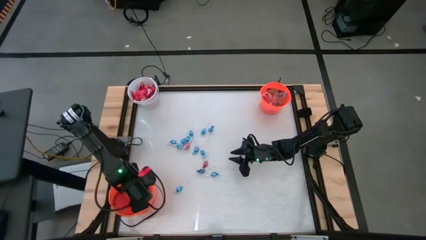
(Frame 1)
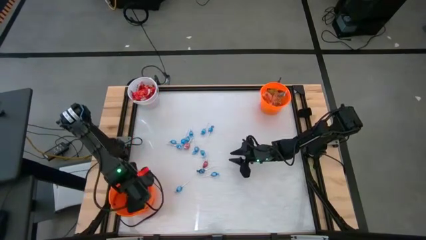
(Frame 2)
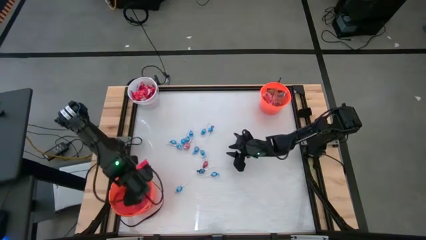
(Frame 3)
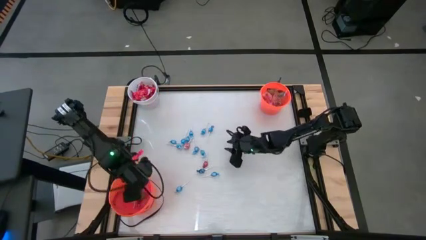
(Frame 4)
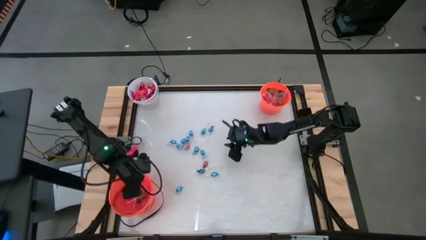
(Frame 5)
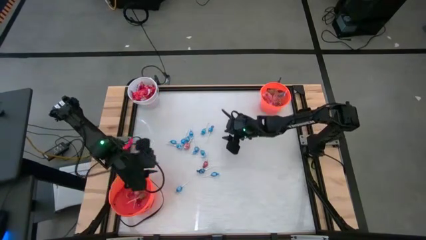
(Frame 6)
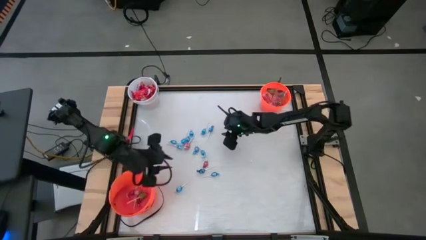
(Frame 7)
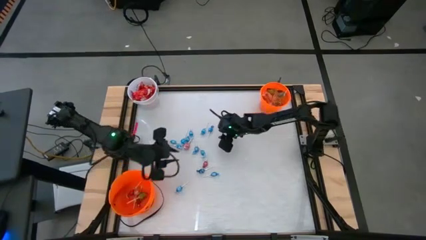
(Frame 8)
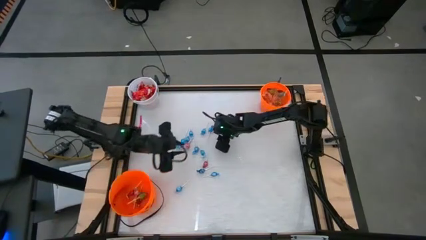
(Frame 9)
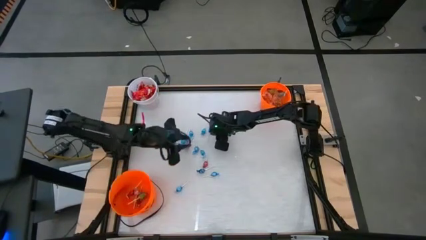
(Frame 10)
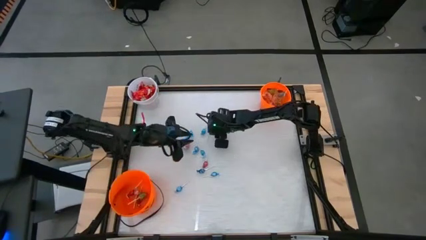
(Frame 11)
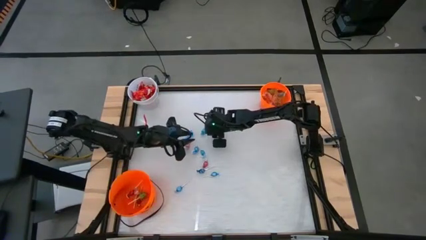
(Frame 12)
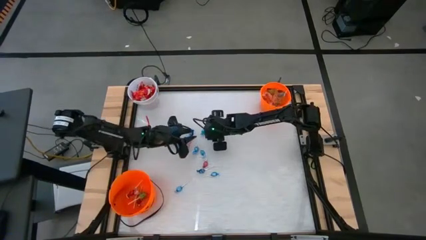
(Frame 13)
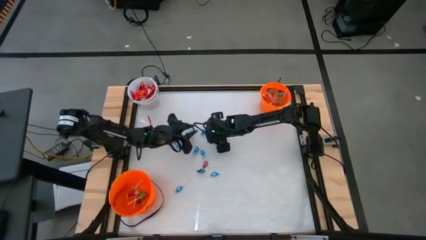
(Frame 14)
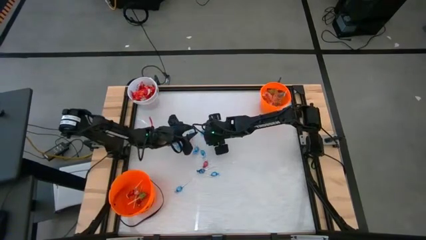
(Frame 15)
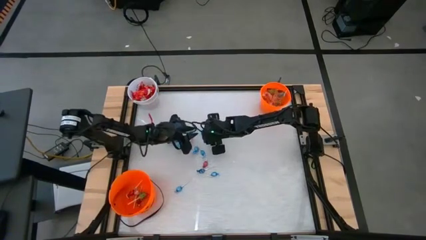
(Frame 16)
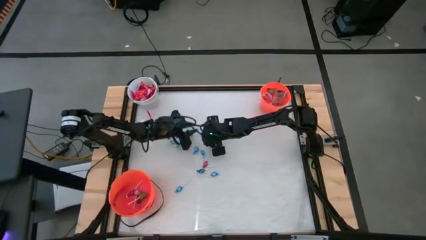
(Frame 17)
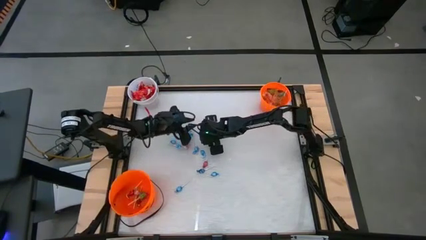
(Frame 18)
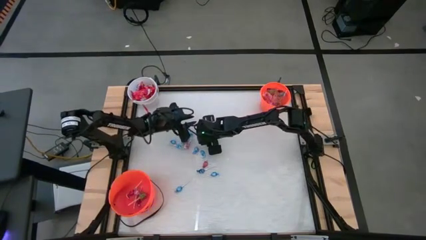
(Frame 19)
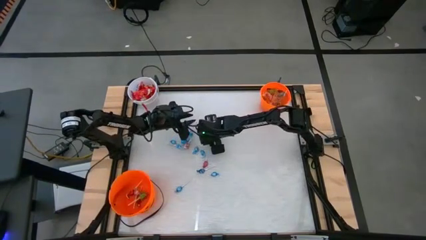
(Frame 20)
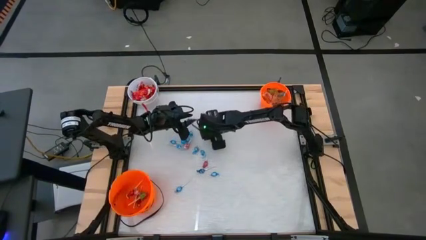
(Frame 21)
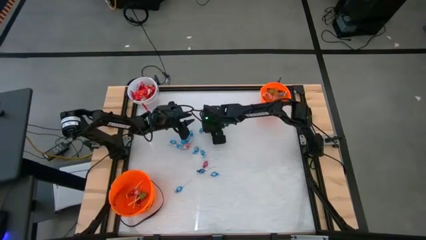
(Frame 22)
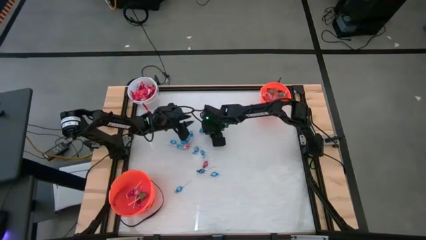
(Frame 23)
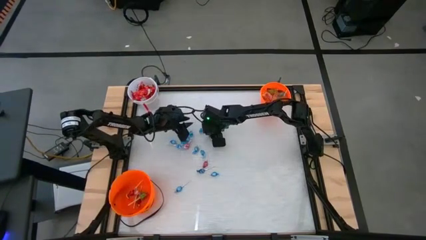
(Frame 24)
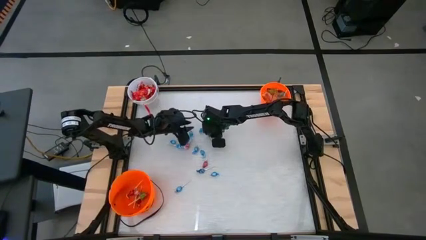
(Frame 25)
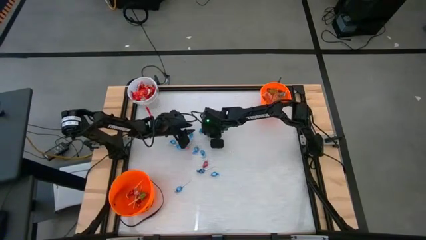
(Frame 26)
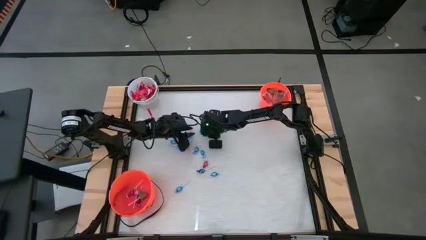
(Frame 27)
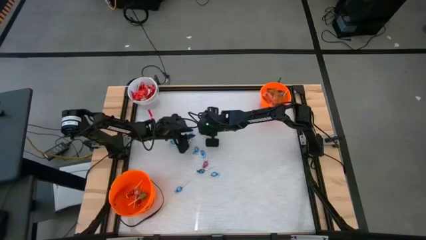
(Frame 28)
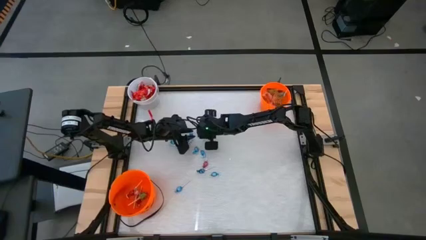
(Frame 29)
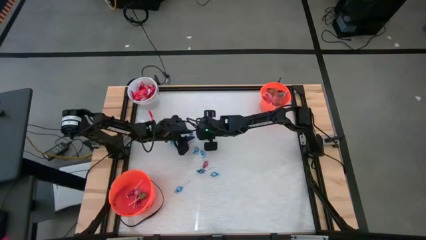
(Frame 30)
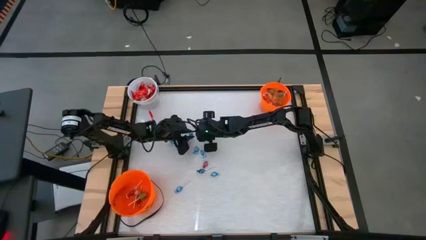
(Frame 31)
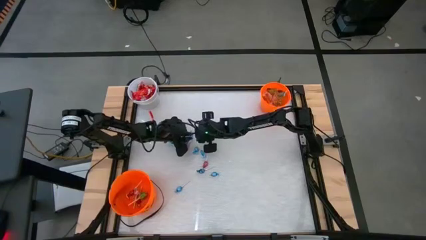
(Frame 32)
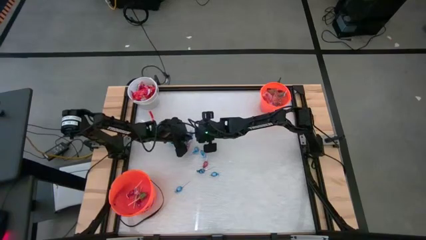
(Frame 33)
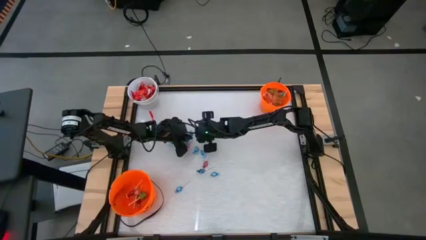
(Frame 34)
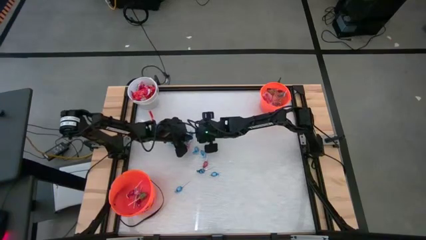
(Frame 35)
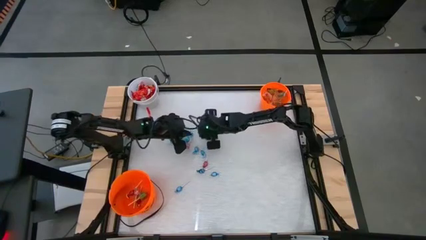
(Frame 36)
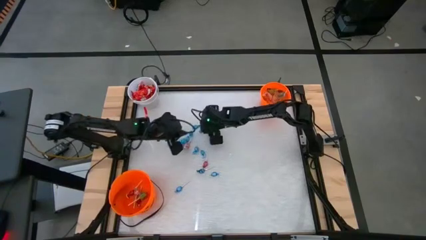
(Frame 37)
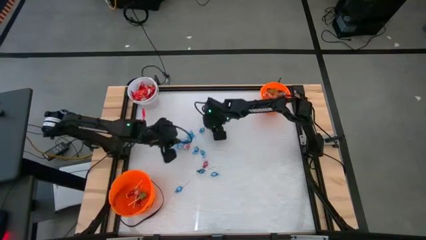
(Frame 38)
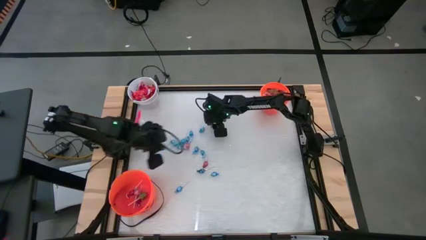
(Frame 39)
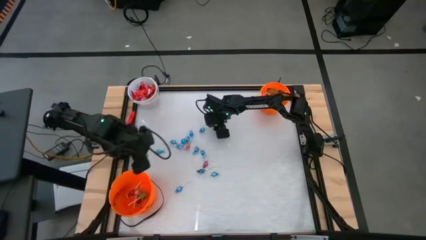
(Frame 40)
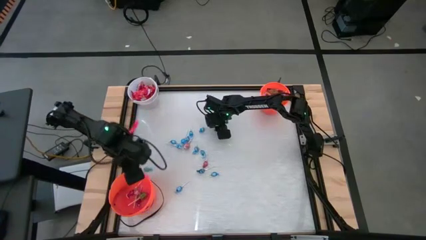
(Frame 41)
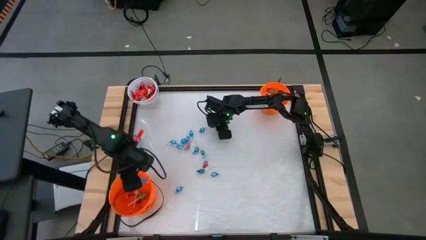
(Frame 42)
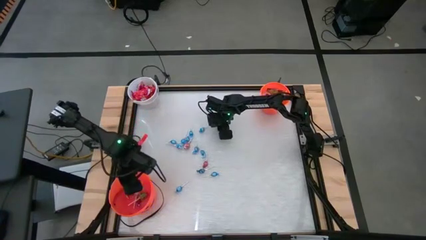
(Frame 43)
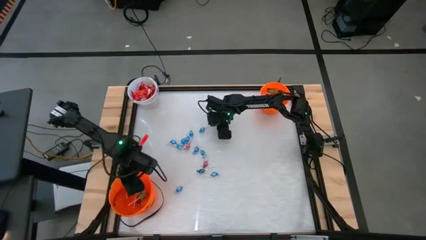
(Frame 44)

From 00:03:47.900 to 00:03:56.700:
Task: Sort candy by brand, put in halloween buckets
Put the blue lollipop into the bottom orange bucket

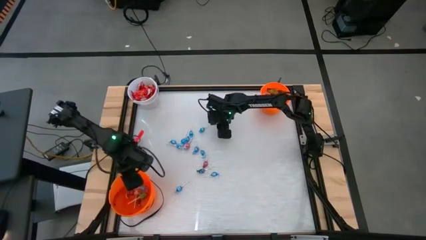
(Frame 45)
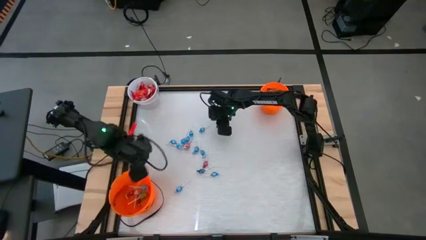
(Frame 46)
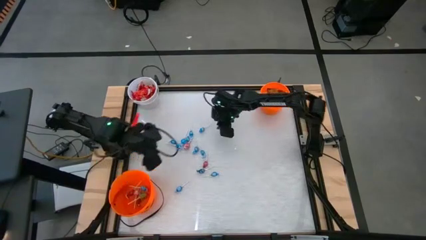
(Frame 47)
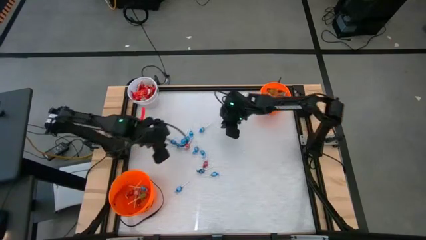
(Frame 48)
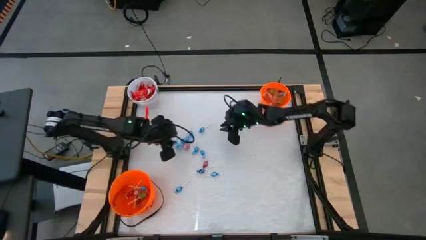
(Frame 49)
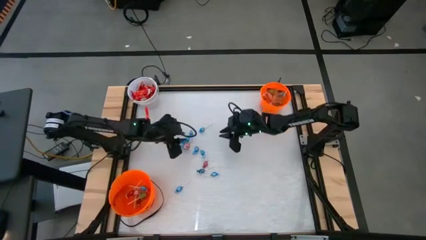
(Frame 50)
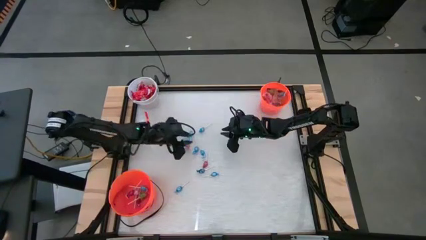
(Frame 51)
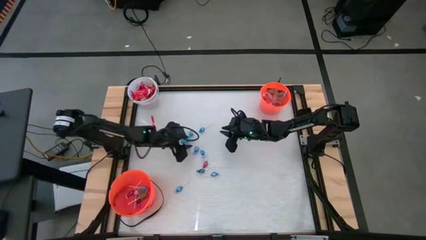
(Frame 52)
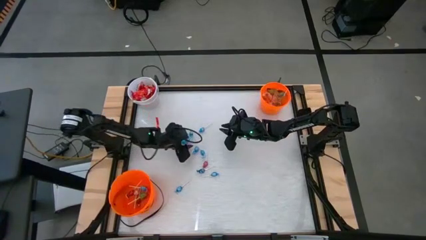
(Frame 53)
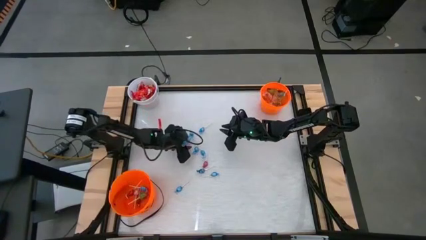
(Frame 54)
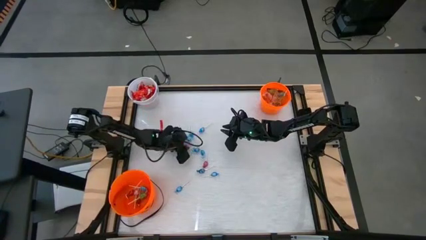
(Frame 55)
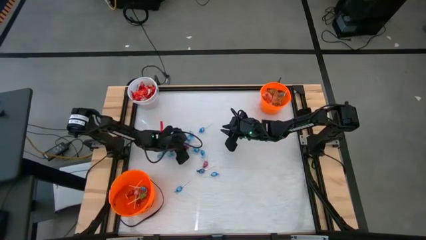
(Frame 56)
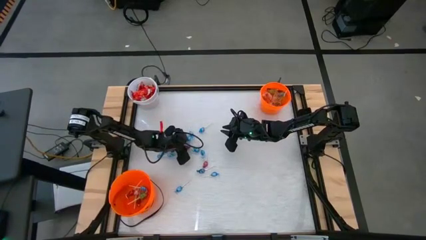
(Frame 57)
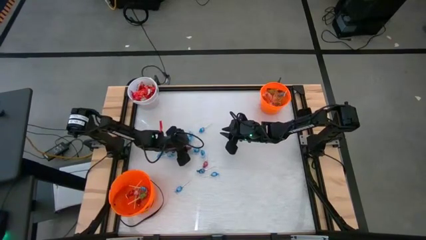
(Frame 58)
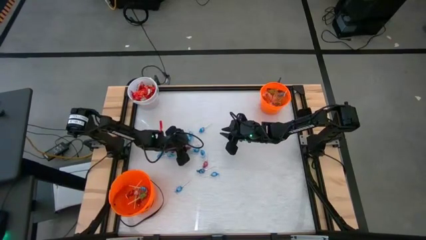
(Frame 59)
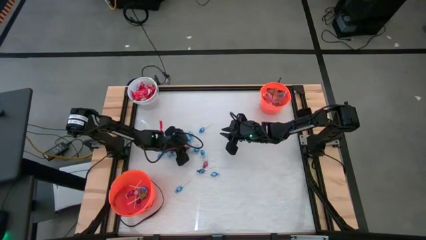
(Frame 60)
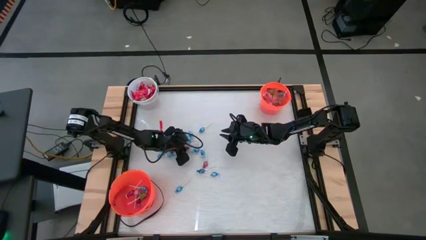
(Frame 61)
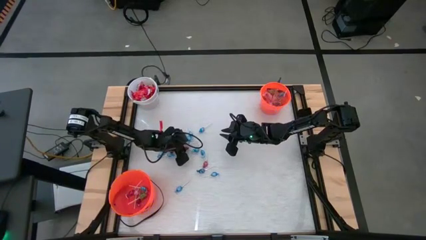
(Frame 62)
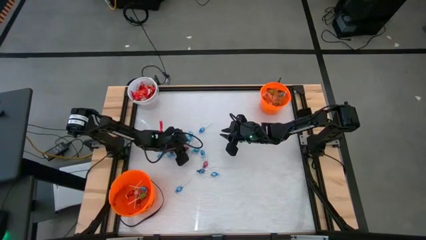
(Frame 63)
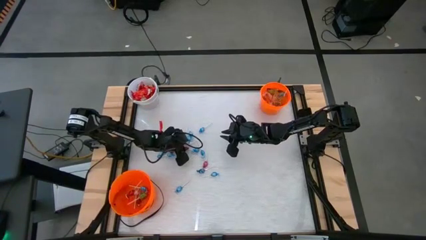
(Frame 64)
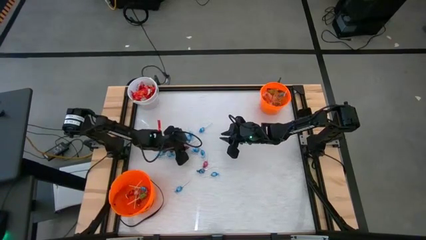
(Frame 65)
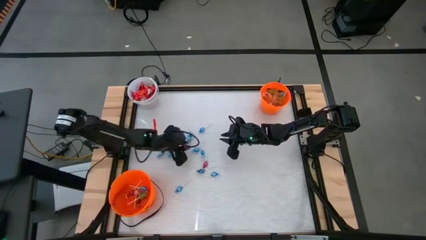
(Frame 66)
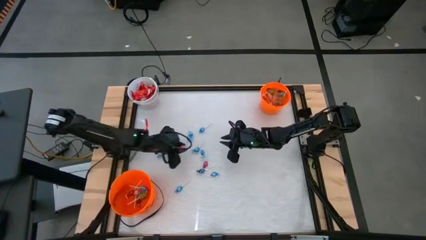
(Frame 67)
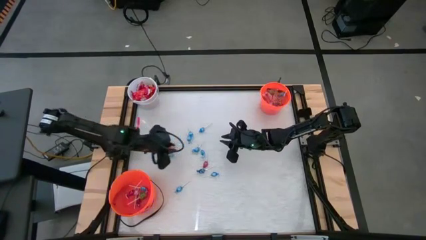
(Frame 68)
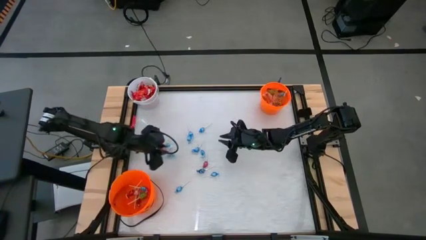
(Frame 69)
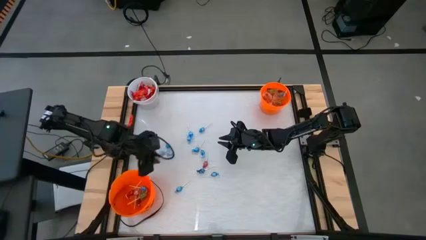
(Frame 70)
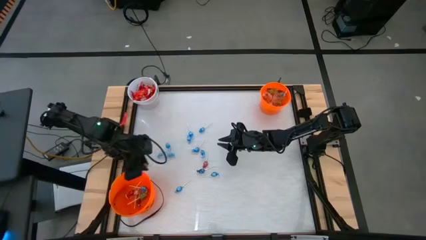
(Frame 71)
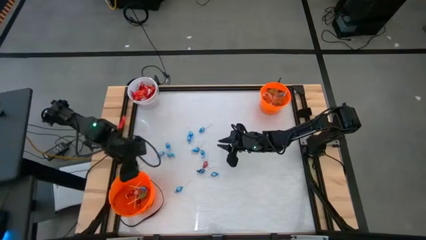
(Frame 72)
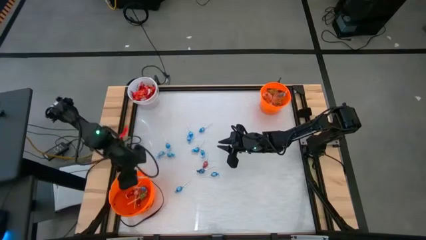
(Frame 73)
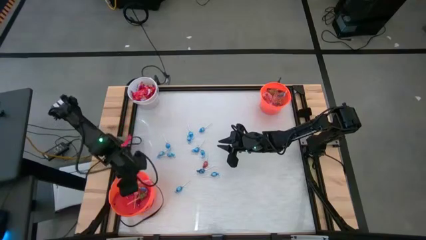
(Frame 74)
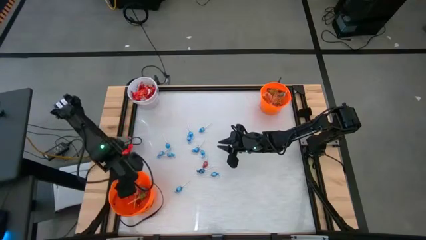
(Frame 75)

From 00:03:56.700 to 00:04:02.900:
Put the top pink lollipop into the bottom orange bucket

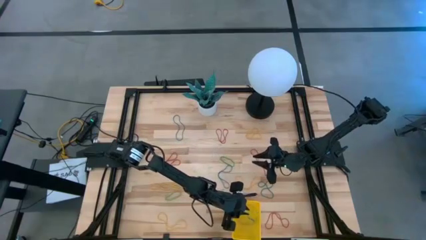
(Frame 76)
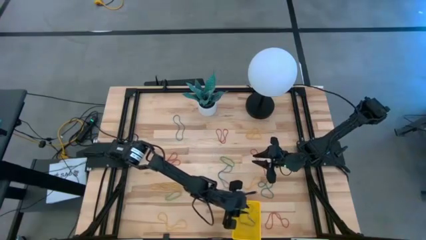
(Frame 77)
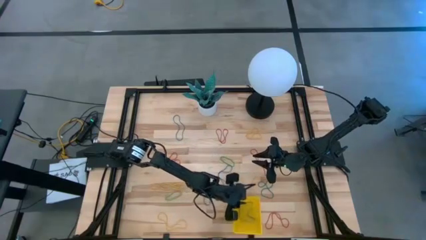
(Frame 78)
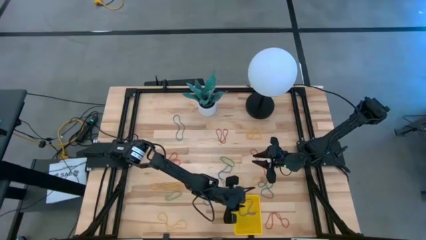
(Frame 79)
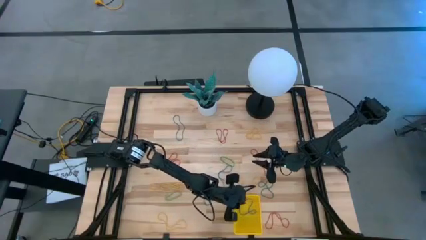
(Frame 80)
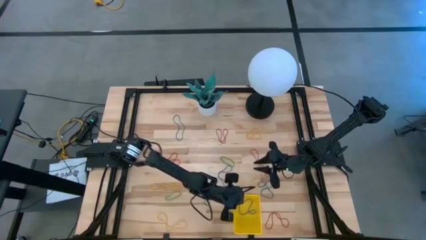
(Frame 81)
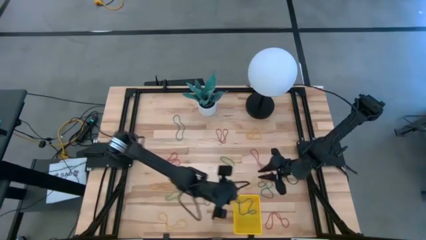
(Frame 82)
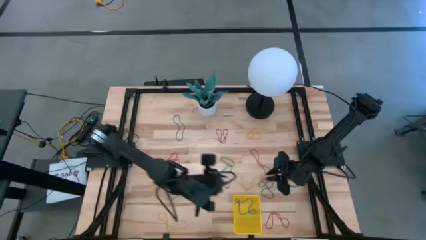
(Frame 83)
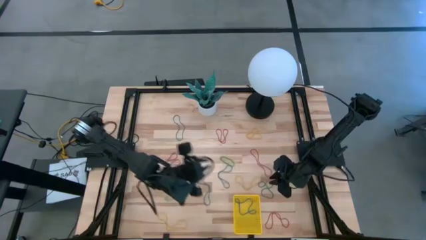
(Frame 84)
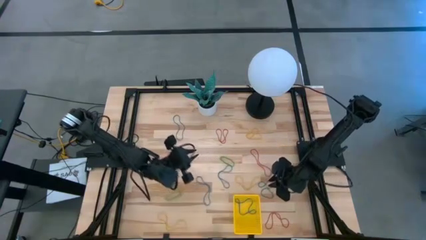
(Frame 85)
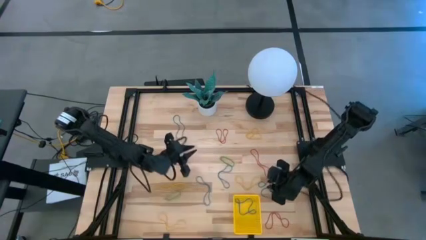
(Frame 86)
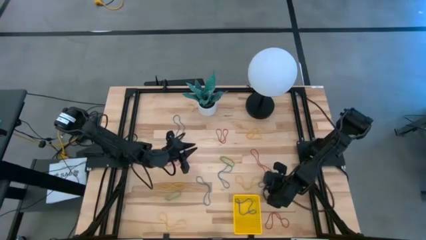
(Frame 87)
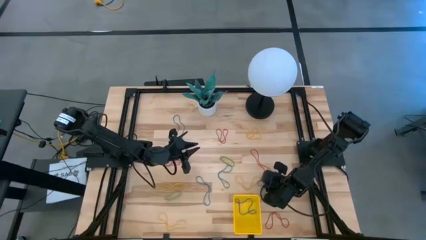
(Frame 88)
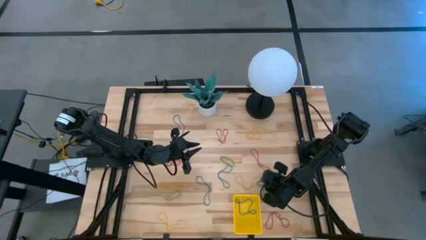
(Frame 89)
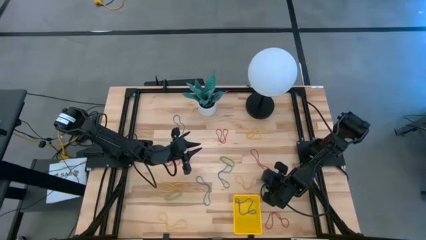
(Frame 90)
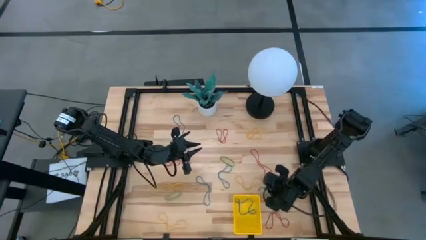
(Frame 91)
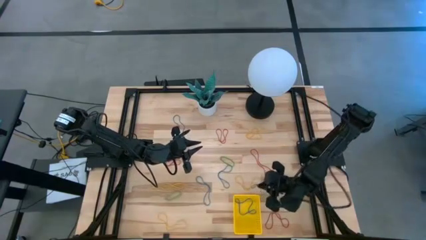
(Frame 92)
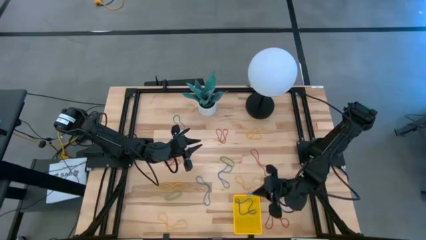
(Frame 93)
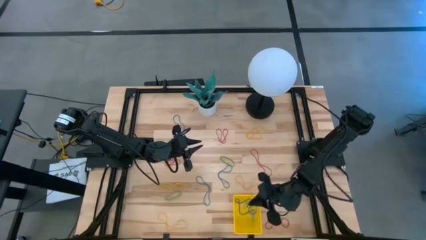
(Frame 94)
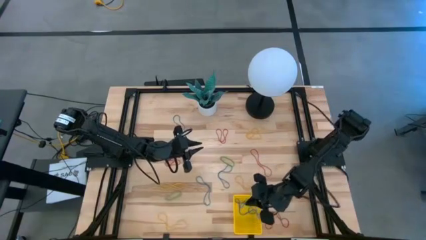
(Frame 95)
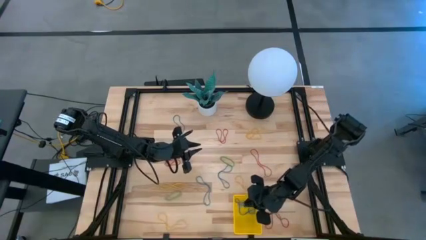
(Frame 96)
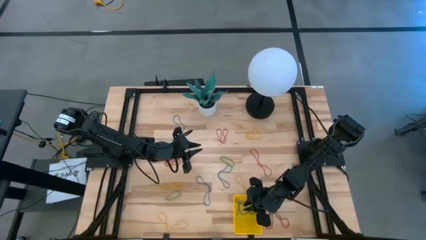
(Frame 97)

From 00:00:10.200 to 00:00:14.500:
Task: Pick and place rubber bands into bin
Put the blue rubber band into the yellow basket
